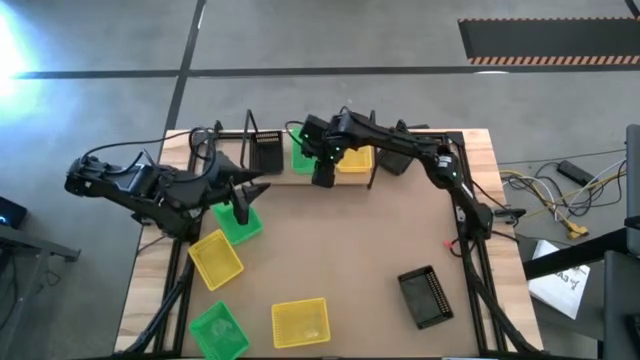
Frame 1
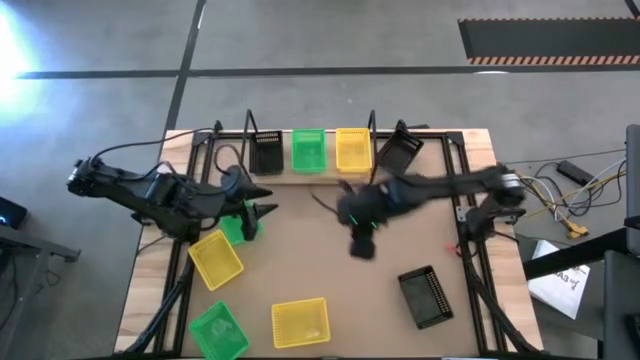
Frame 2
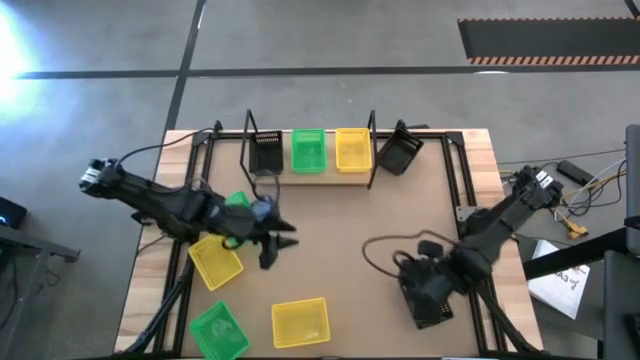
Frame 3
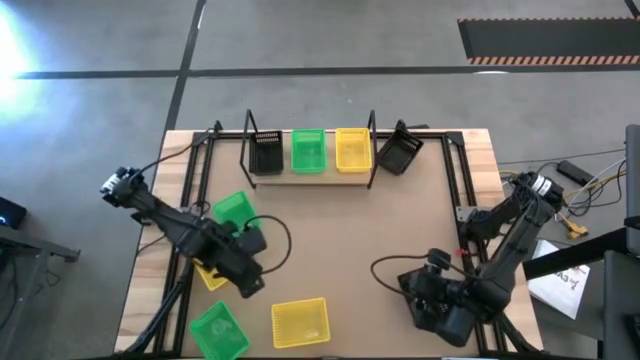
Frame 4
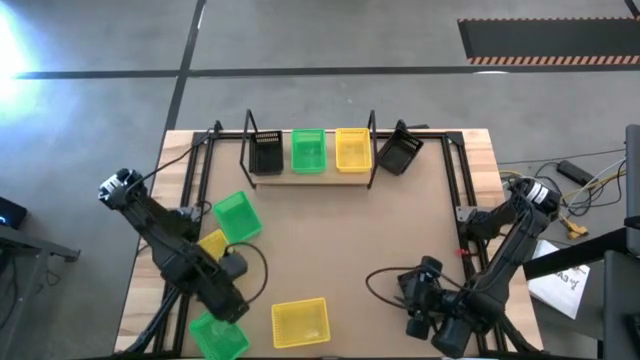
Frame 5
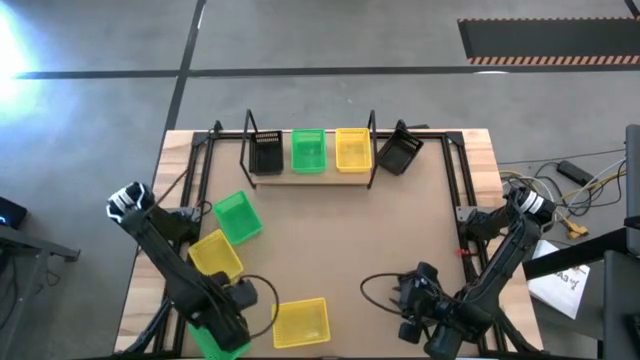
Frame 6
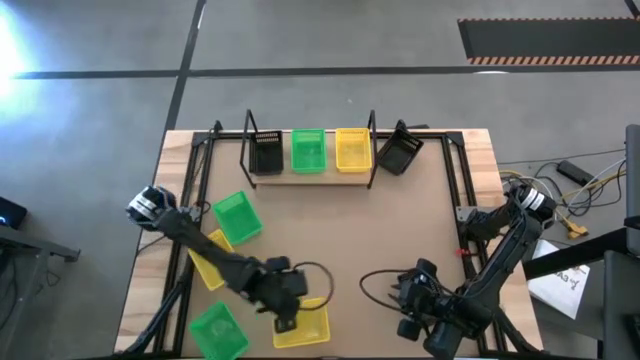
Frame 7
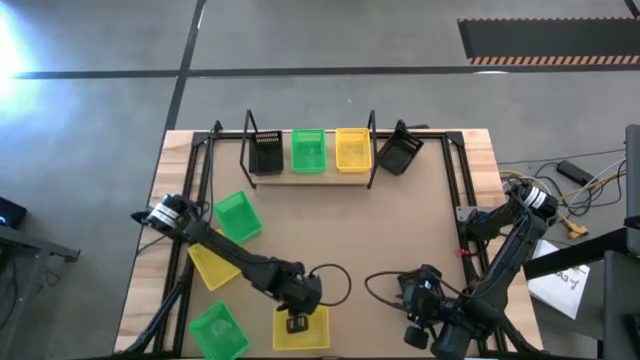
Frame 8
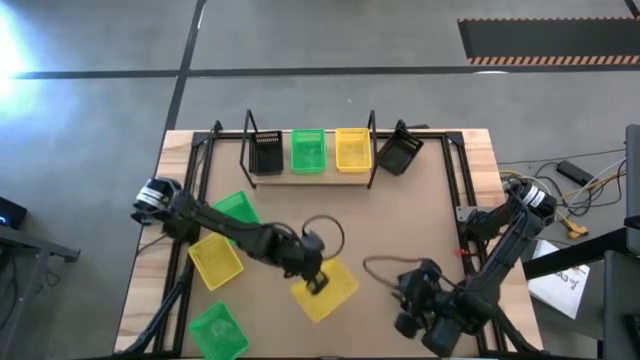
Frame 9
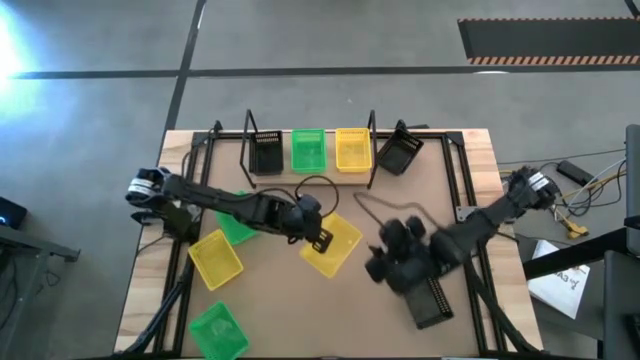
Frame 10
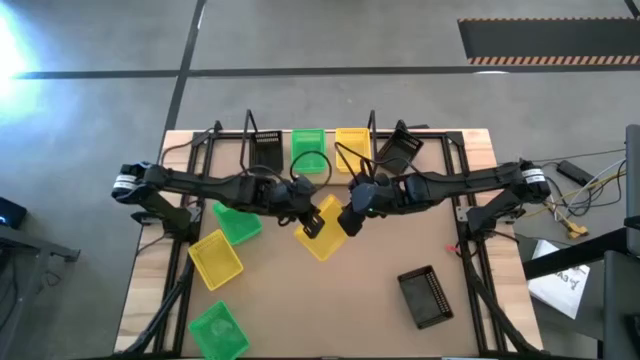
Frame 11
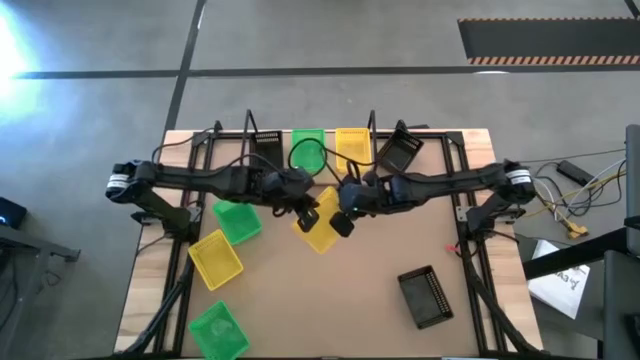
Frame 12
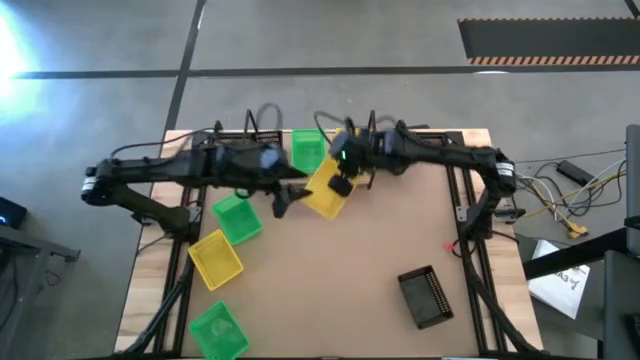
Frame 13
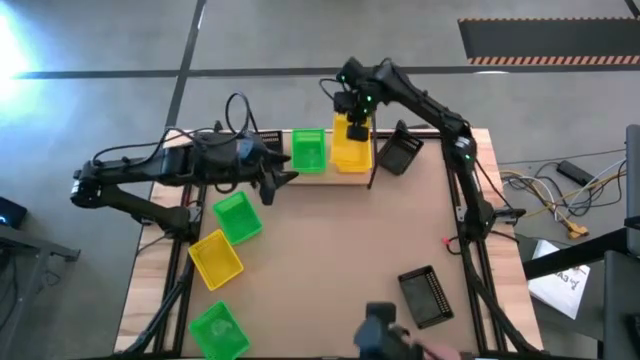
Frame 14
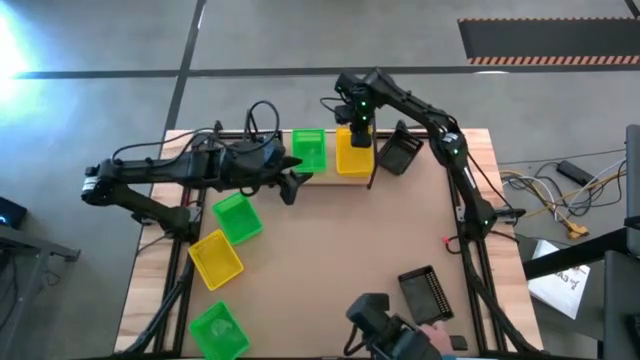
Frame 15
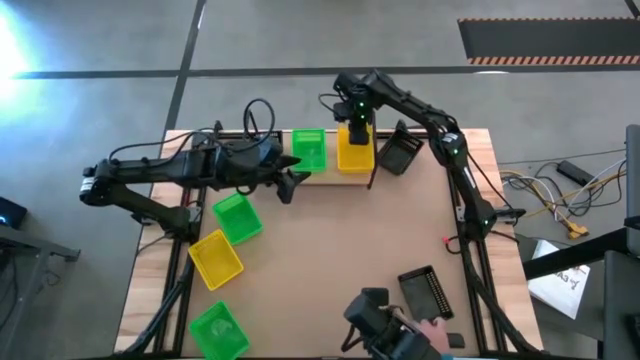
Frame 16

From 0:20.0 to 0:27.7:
Task: Stack baskets on shelf by color
Stack the bottom yellow basket on the yellow basket on the shelf

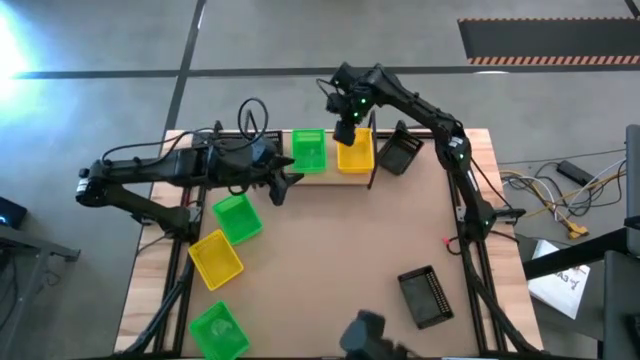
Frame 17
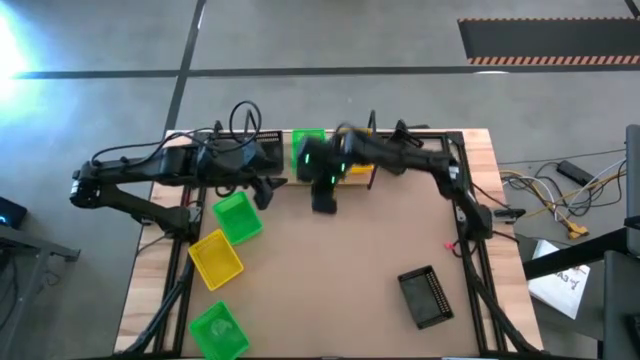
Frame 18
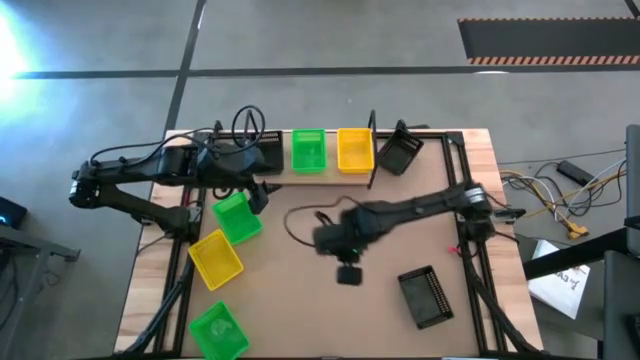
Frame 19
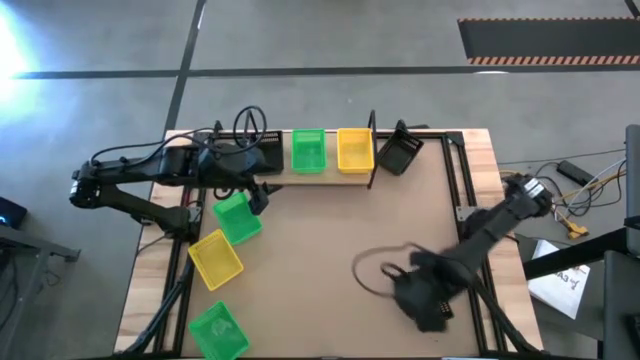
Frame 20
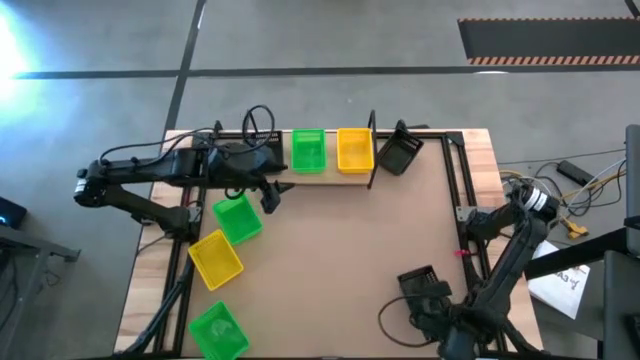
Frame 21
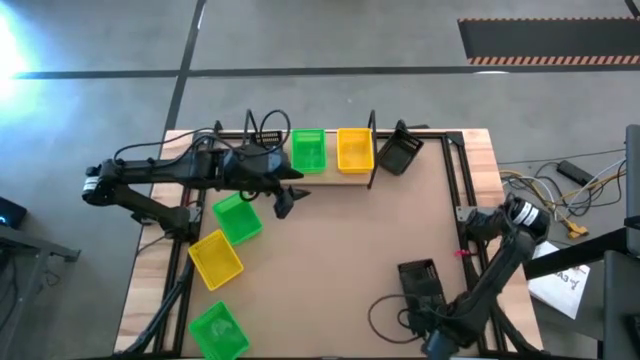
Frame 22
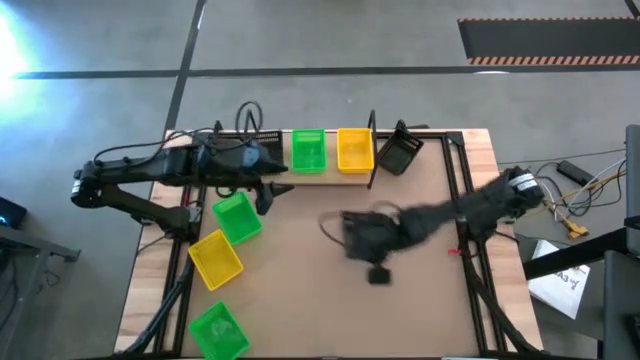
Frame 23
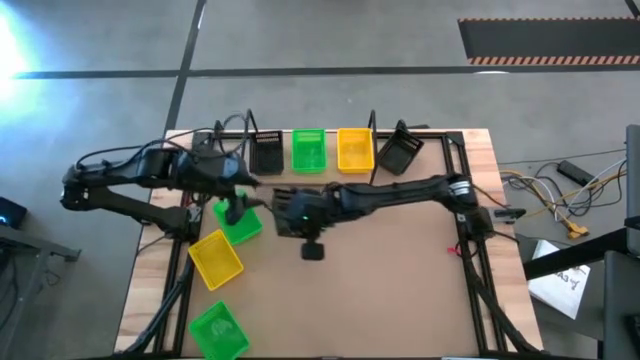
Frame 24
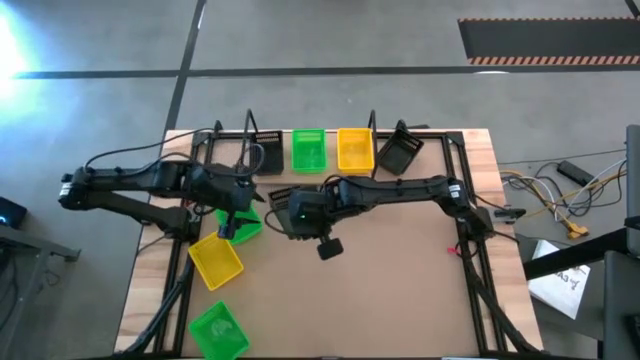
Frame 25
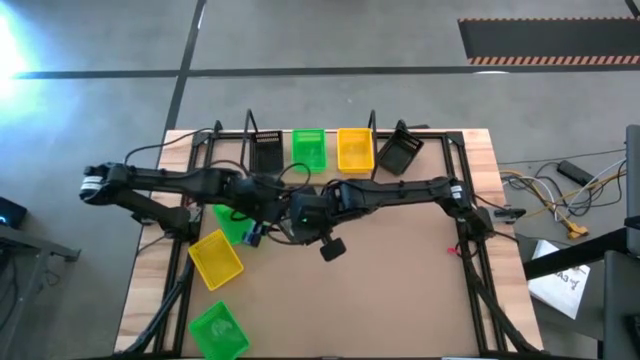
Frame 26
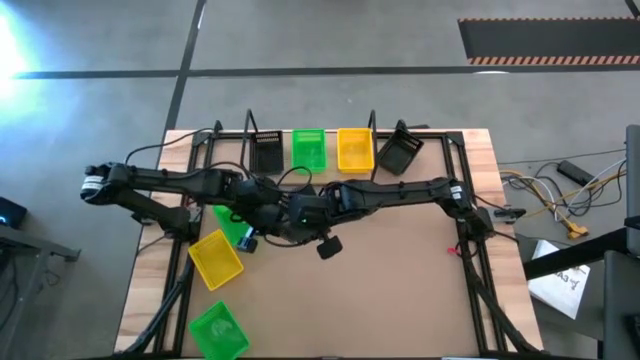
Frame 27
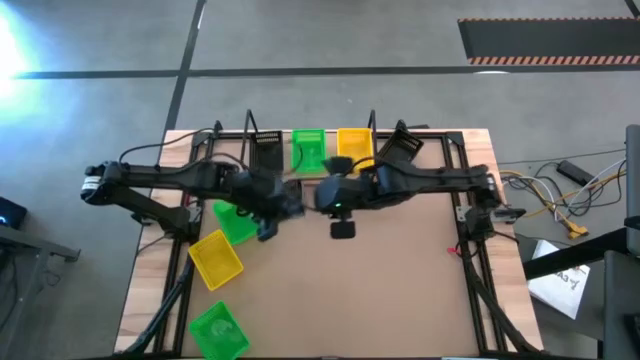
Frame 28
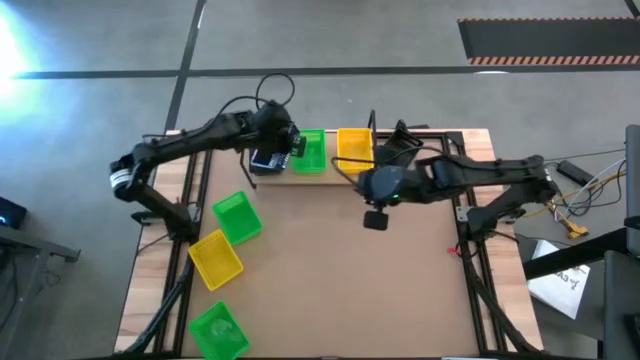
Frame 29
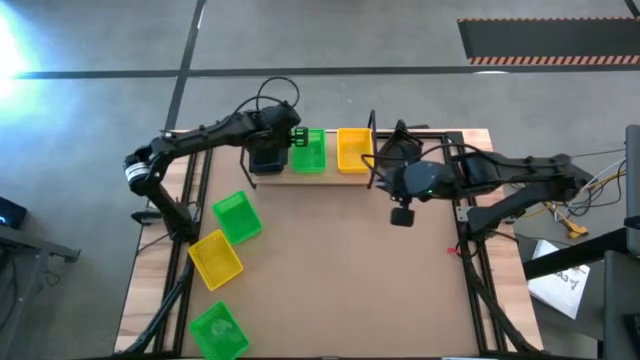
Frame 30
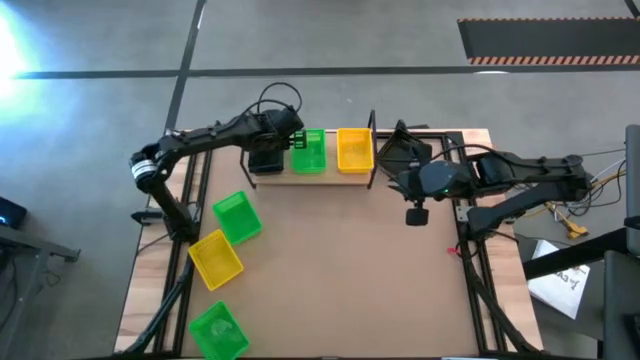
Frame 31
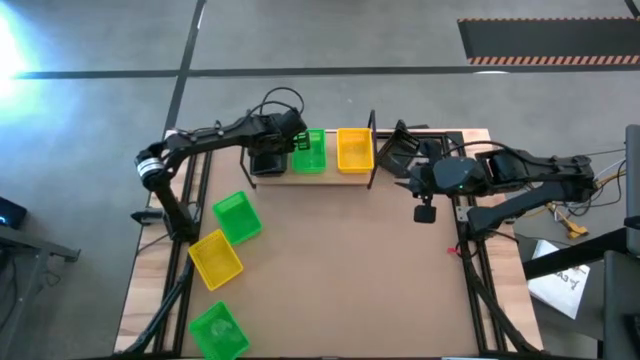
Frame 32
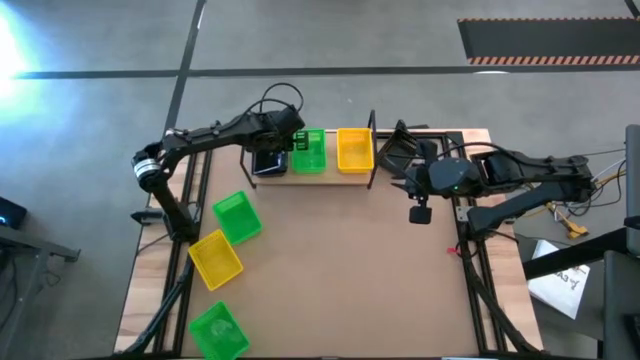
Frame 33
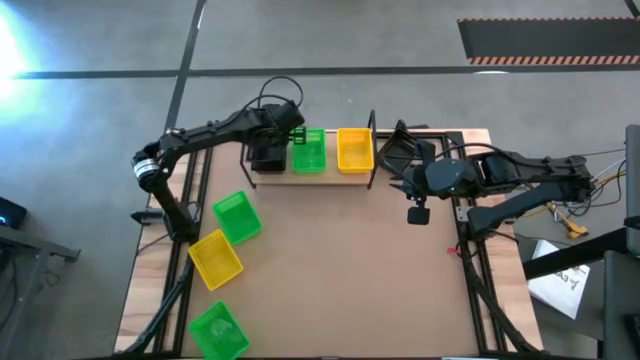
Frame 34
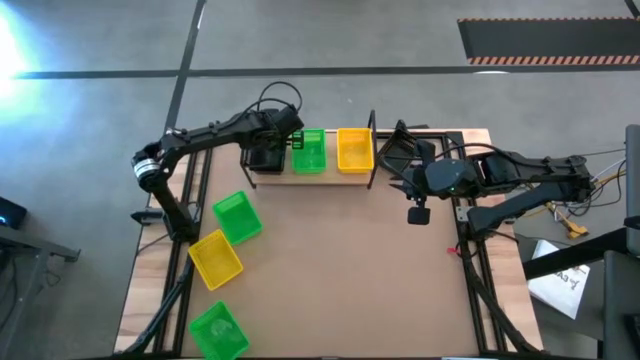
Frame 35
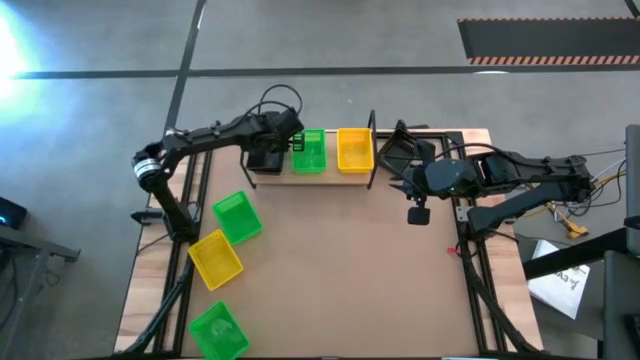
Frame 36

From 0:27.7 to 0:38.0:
Stack the bottom black basket on the black basket on the shelf

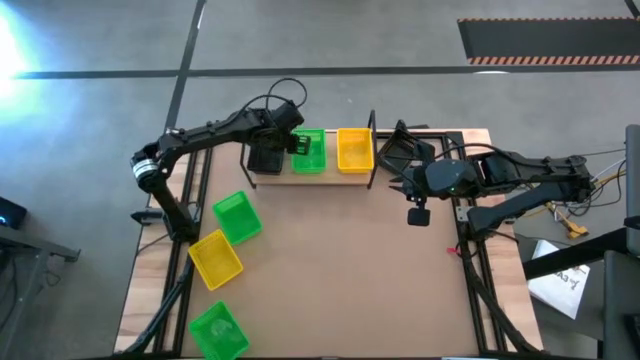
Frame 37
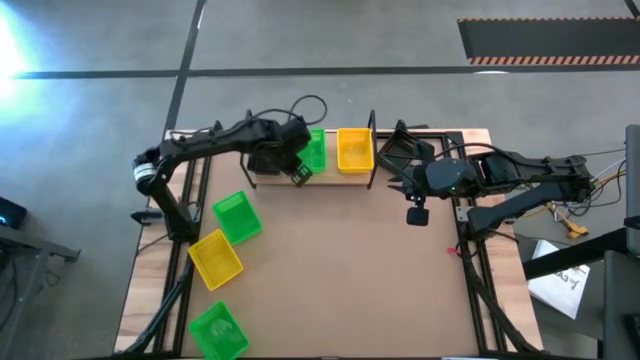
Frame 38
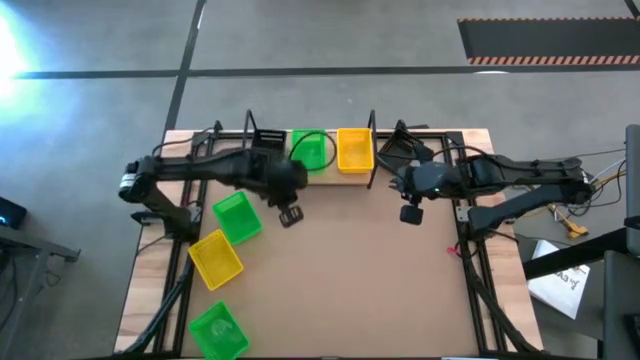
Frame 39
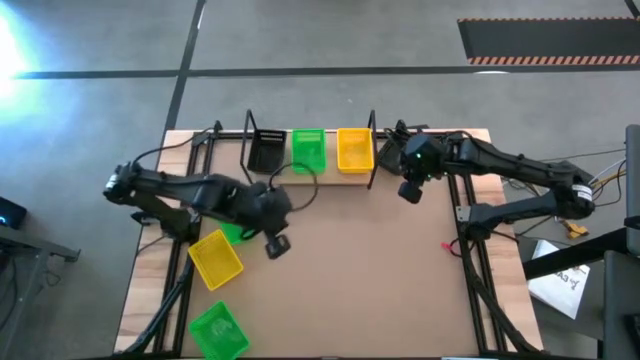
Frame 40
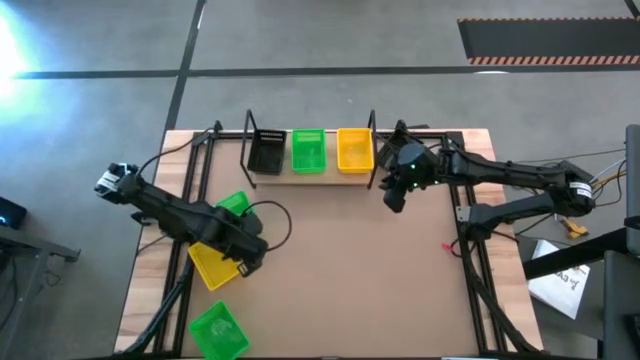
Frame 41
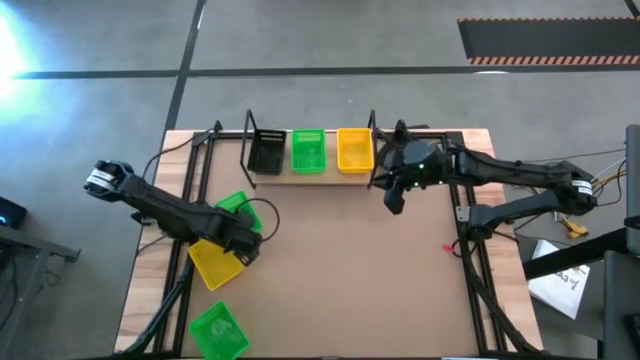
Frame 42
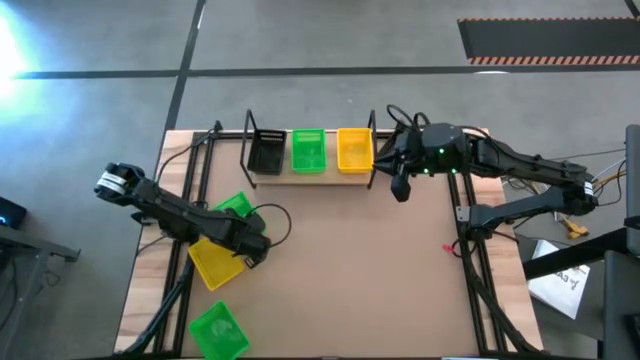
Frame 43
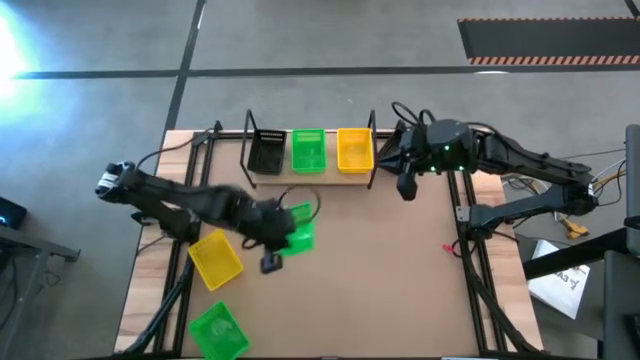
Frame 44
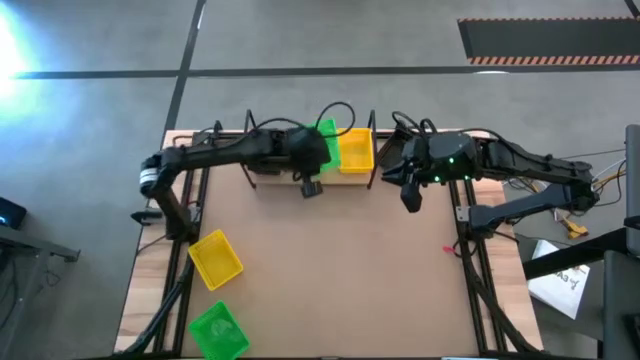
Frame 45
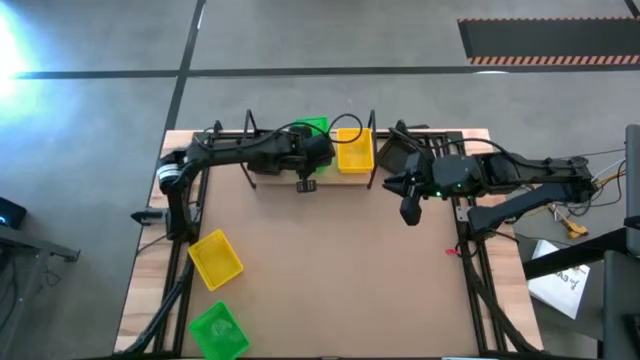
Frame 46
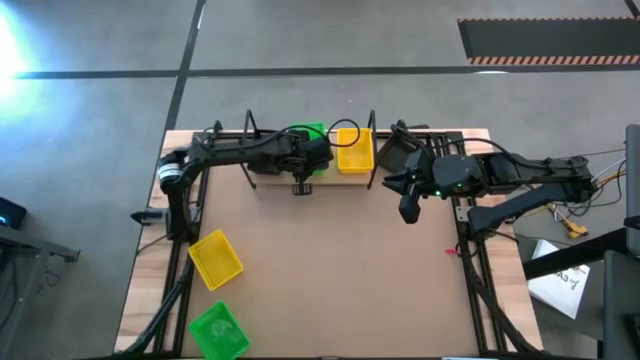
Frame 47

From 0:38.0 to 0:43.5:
Stack the top green basket on the green basket on the shelf
